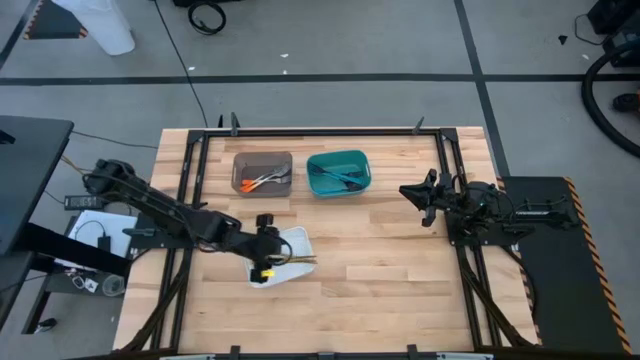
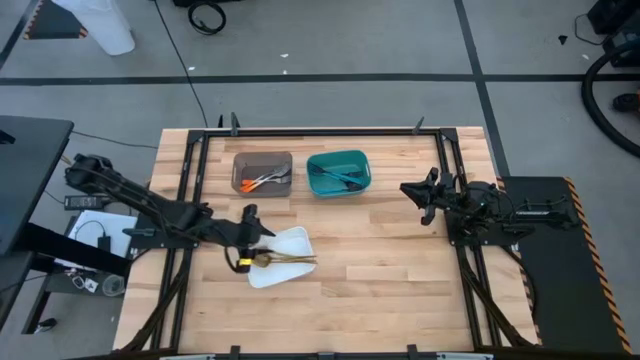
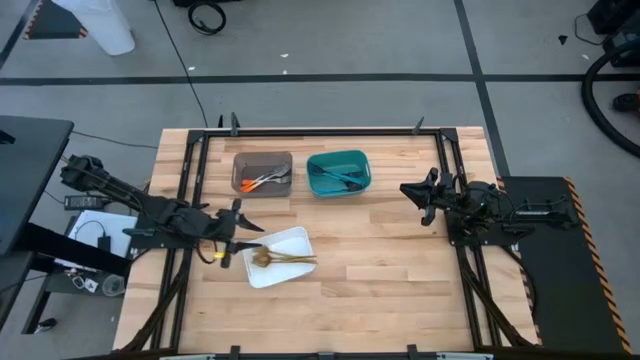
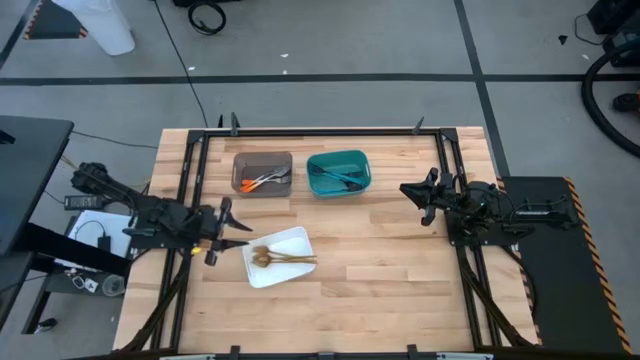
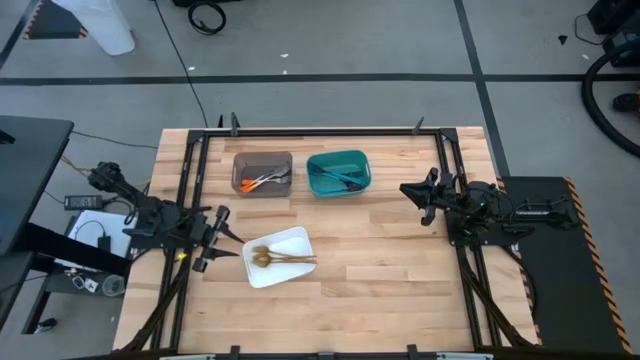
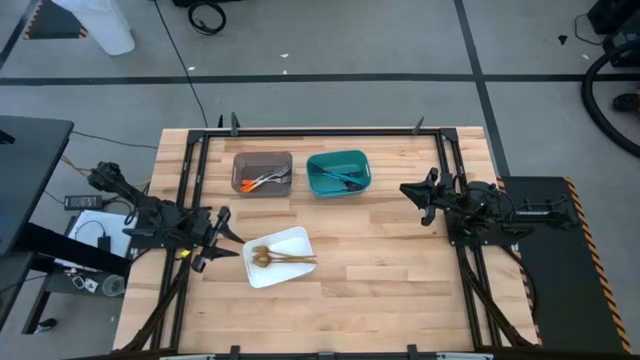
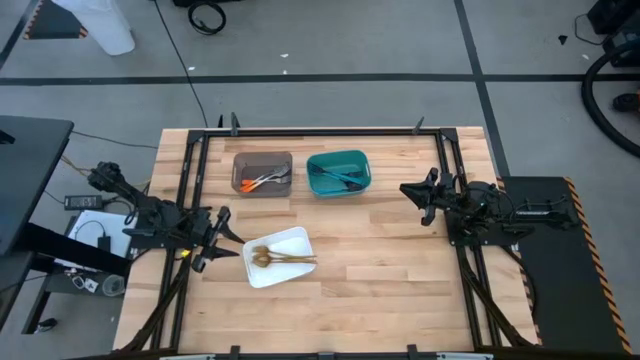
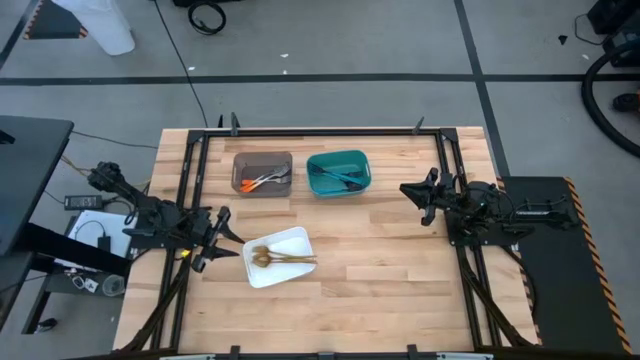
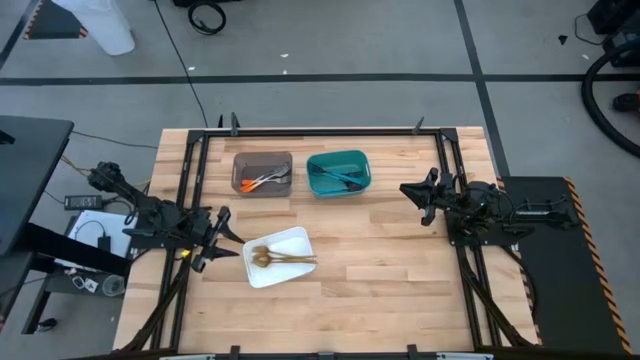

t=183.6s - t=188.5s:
Task: Sort silverware by color (type)
Return to Home Position

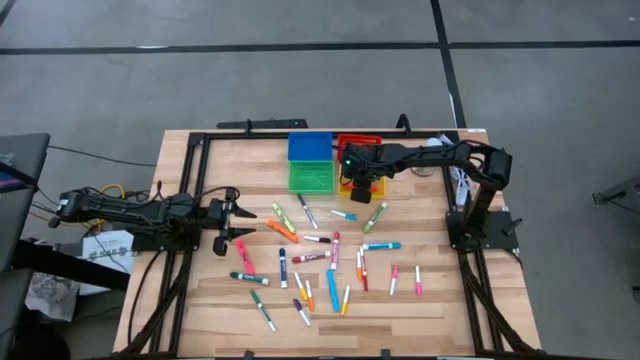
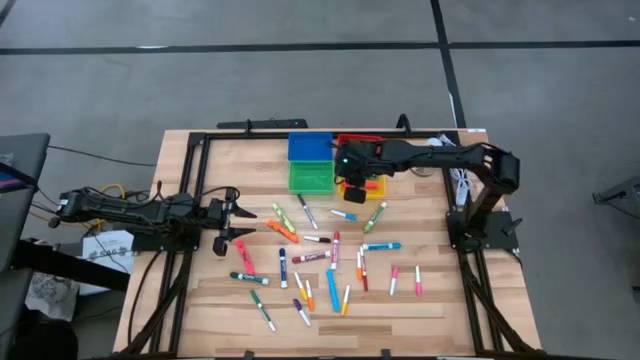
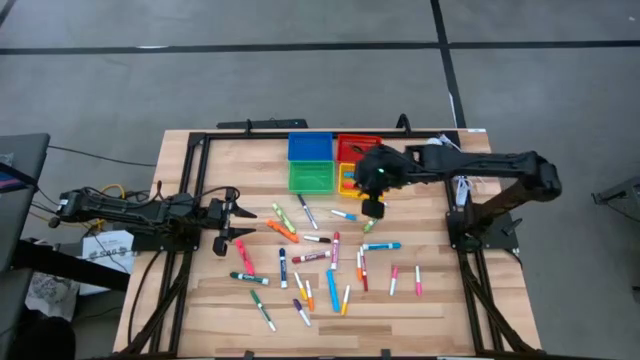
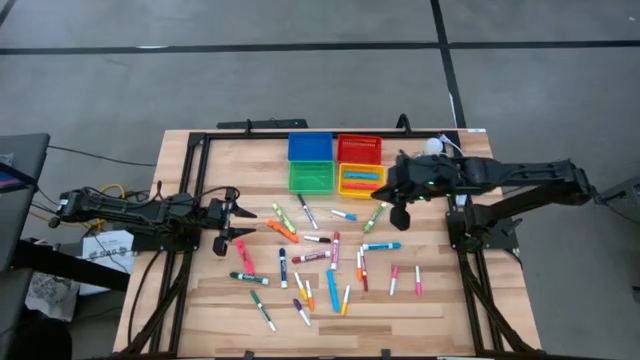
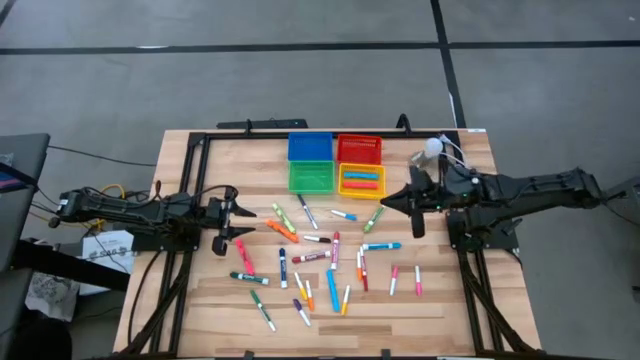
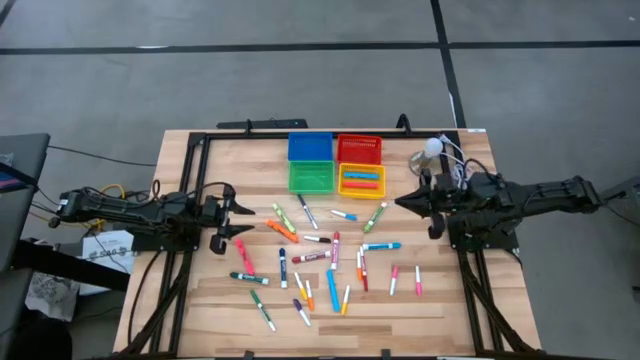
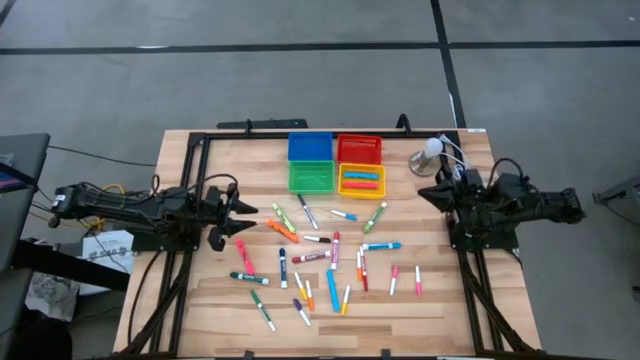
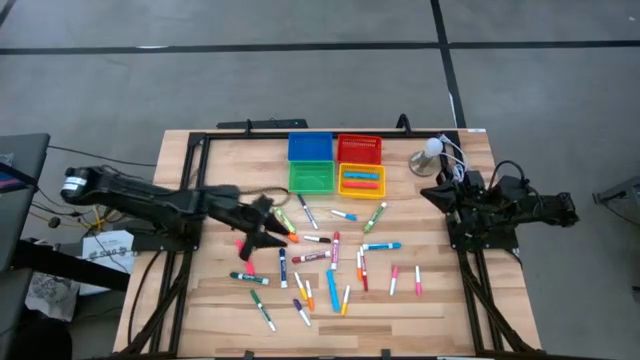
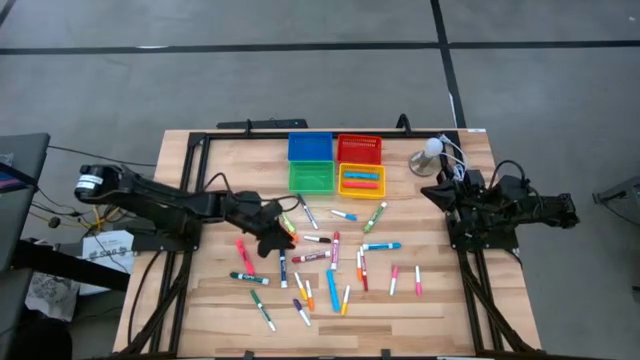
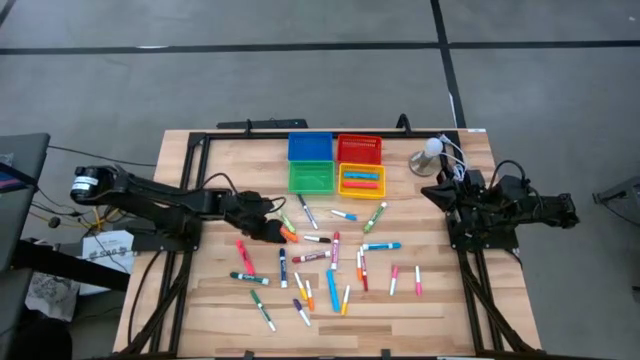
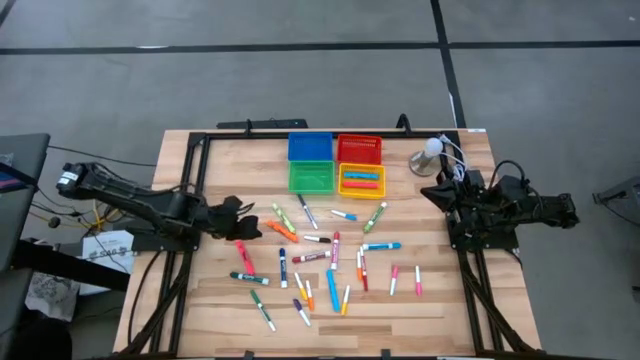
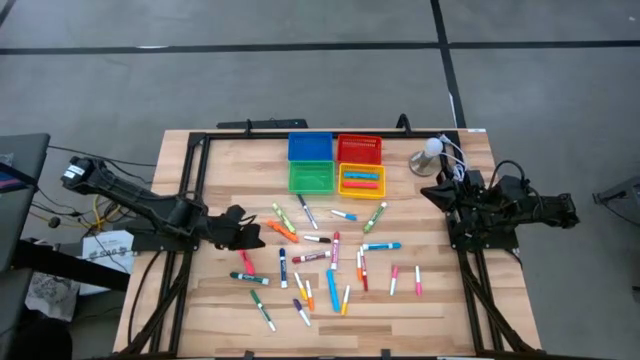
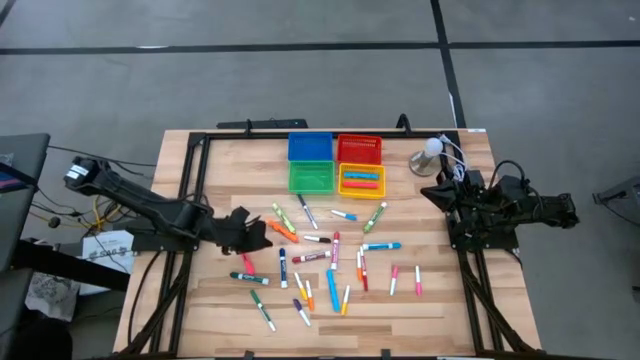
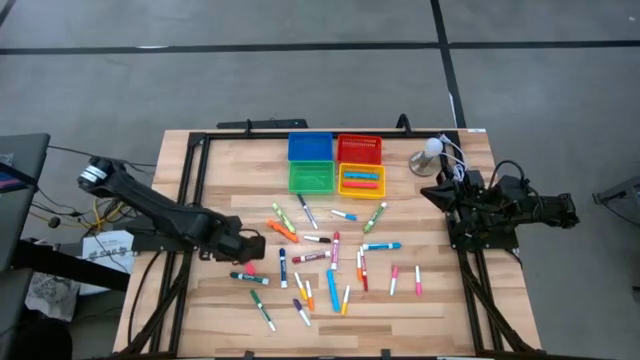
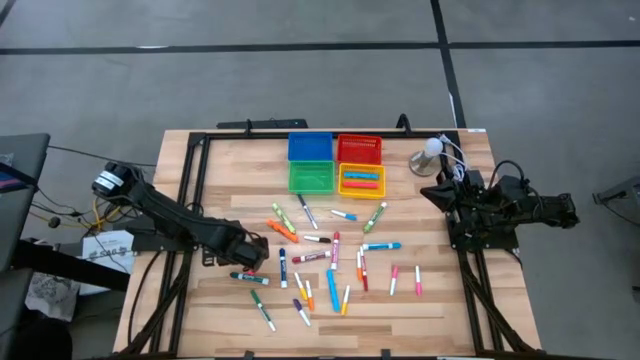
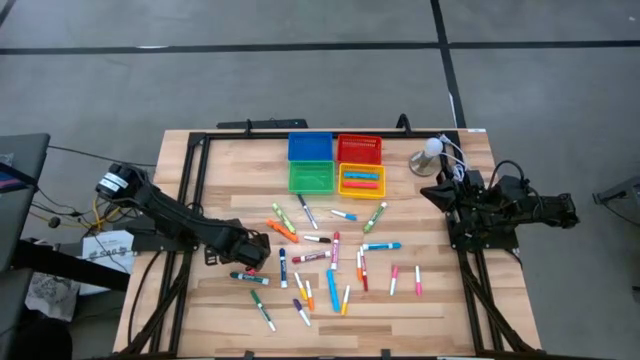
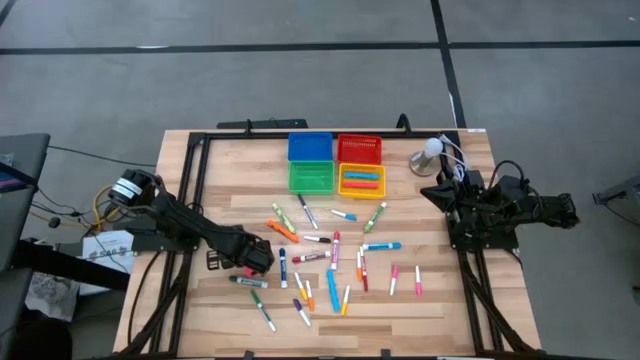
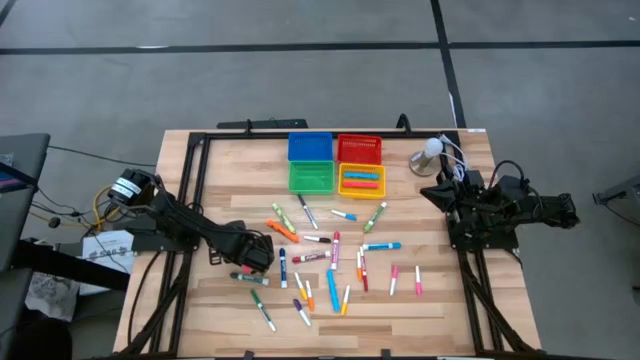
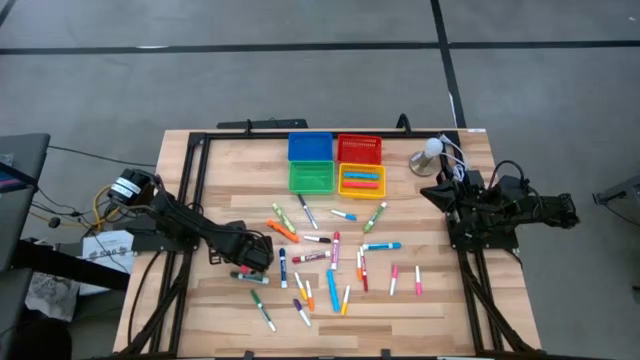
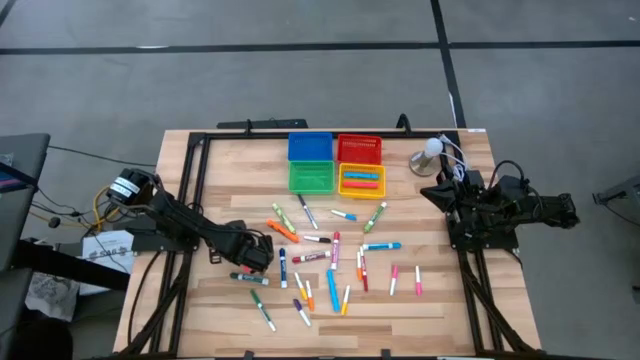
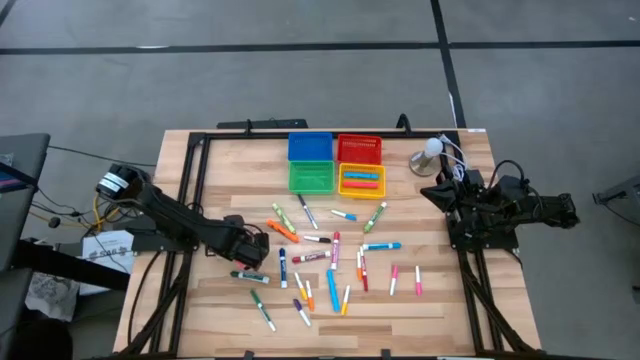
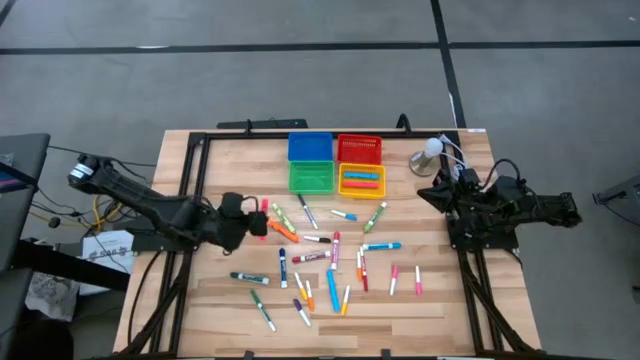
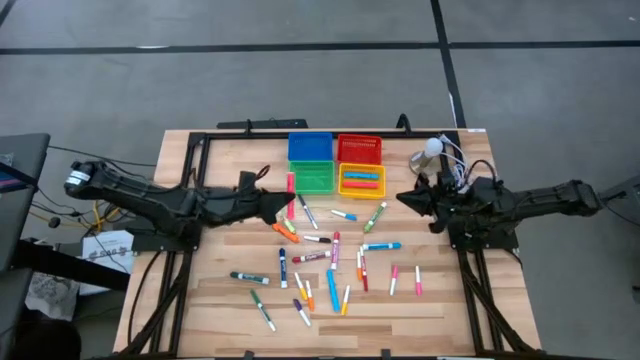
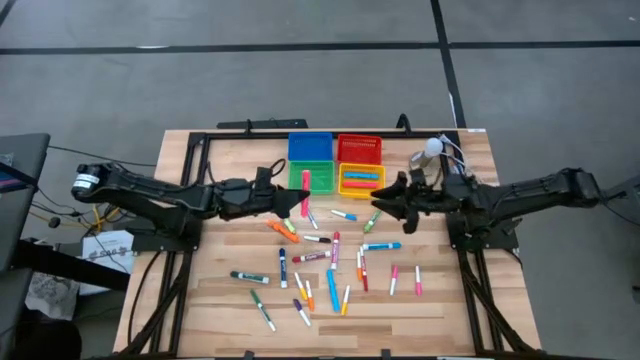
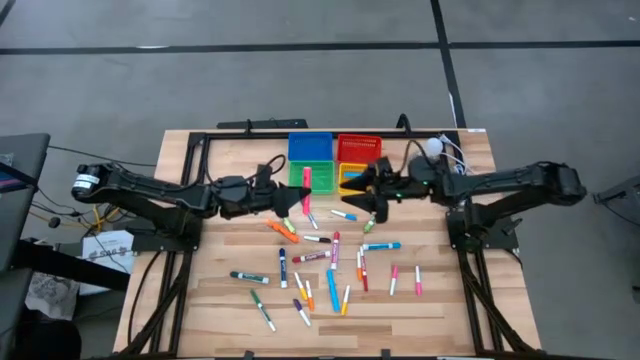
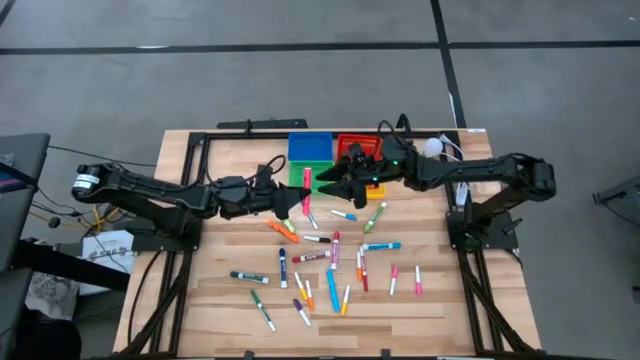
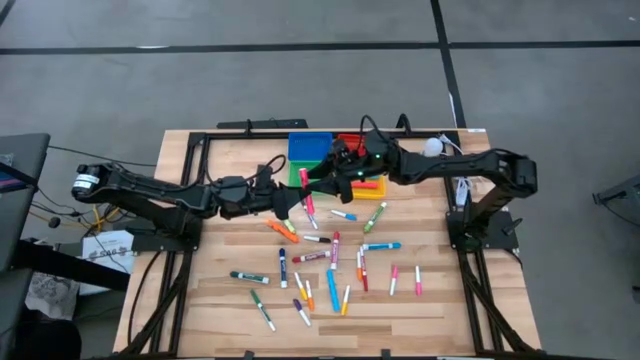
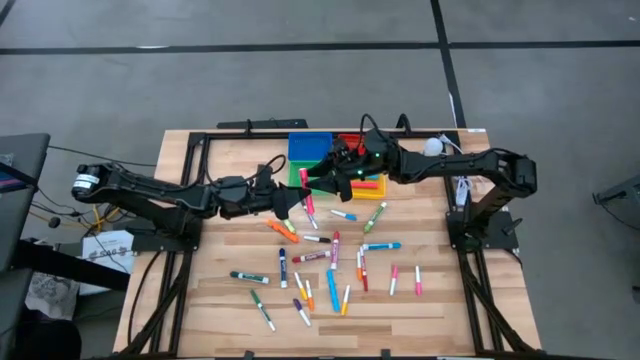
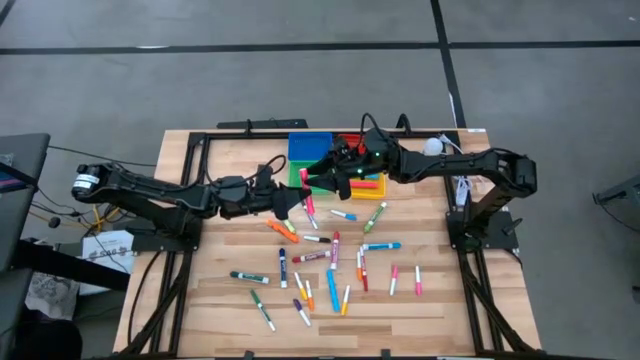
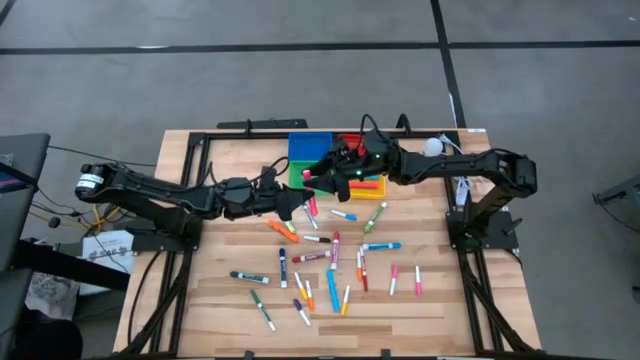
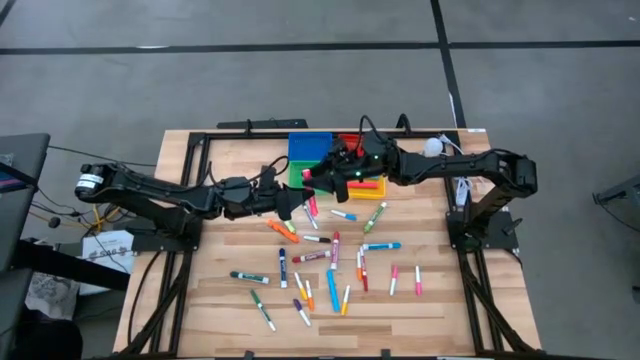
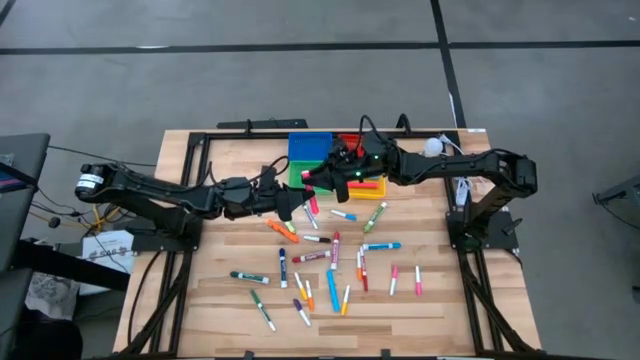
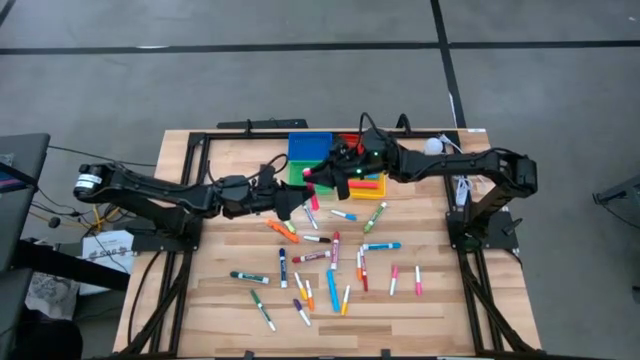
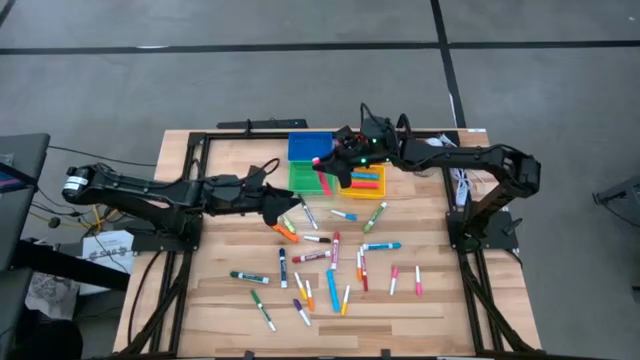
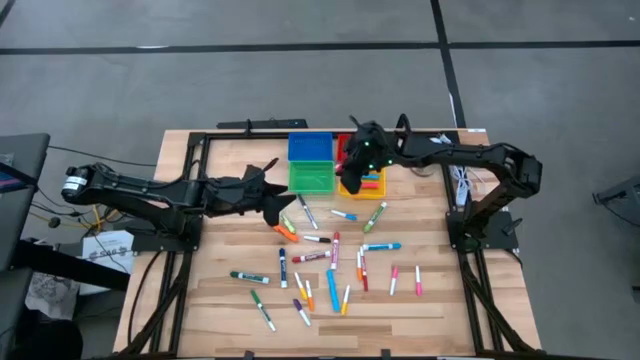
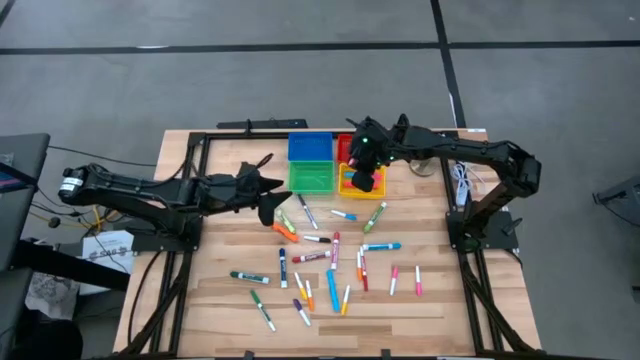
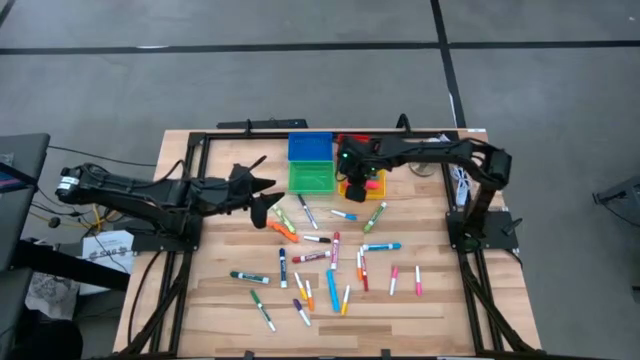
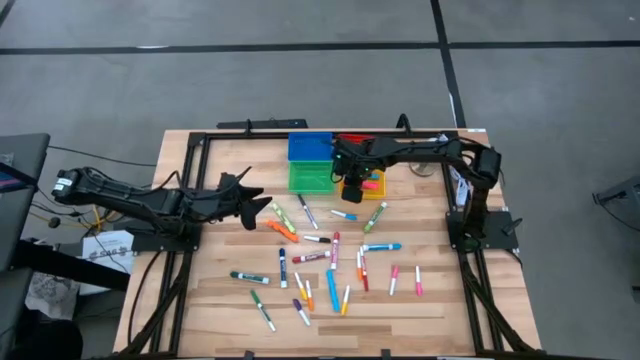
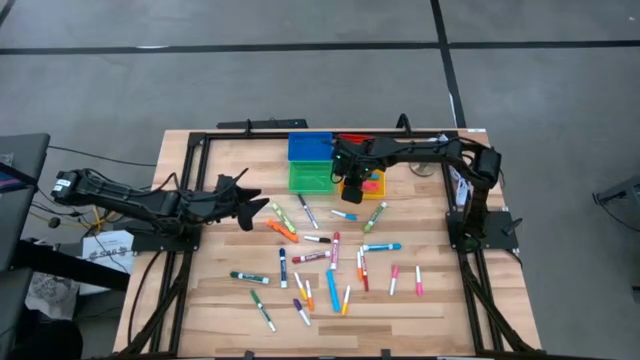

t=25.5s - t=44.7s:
Task: Pick & Place Markers
Put the large pink highlighter pen into the yellow bin
